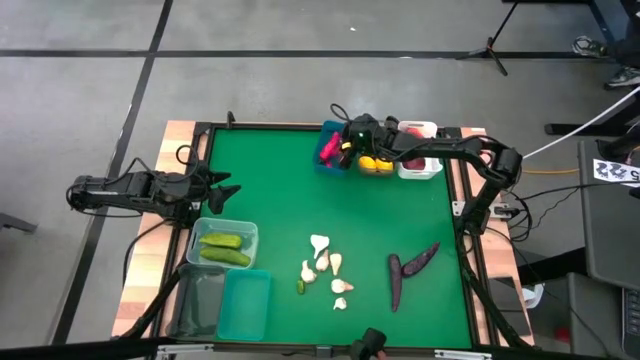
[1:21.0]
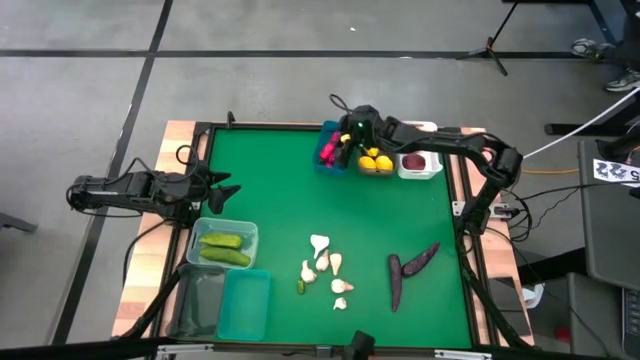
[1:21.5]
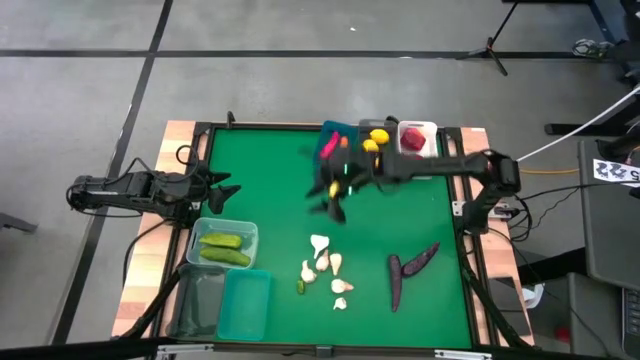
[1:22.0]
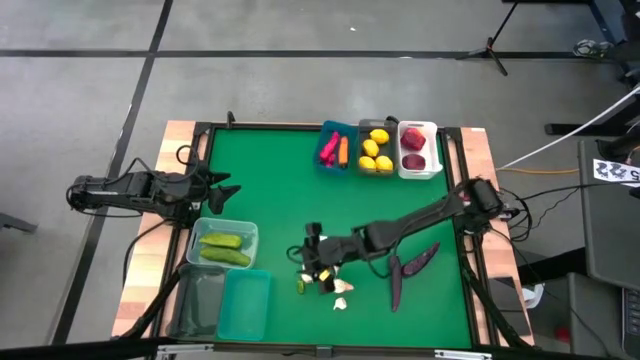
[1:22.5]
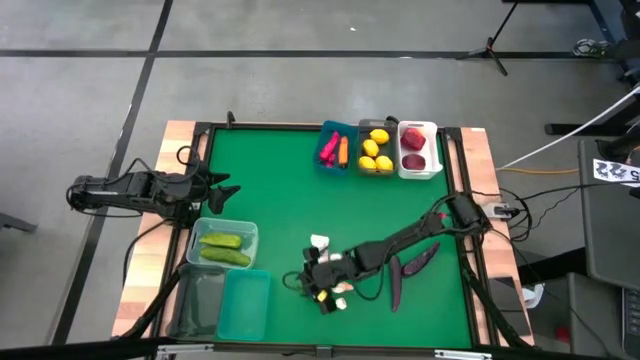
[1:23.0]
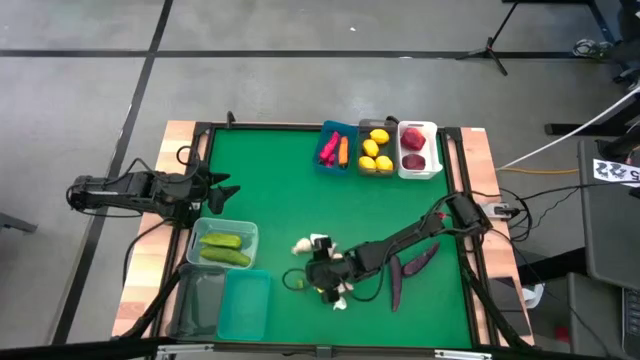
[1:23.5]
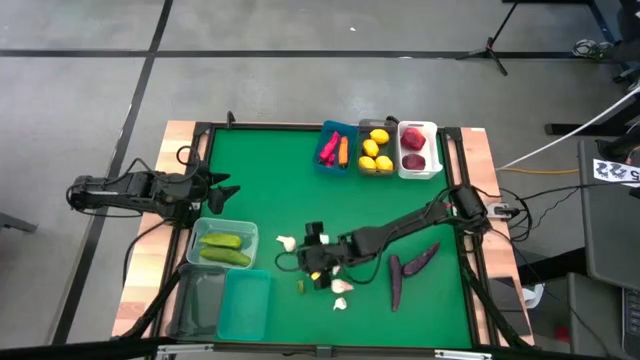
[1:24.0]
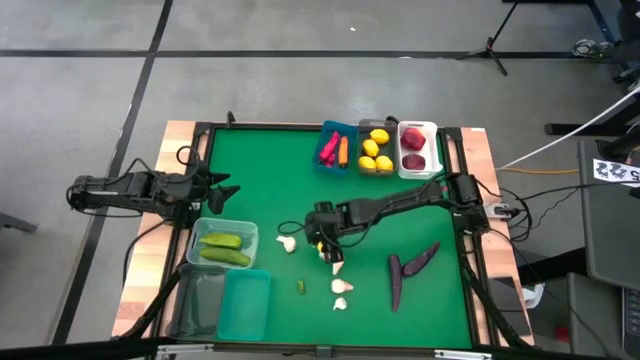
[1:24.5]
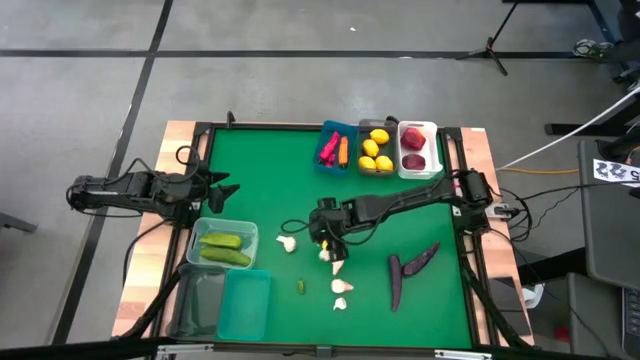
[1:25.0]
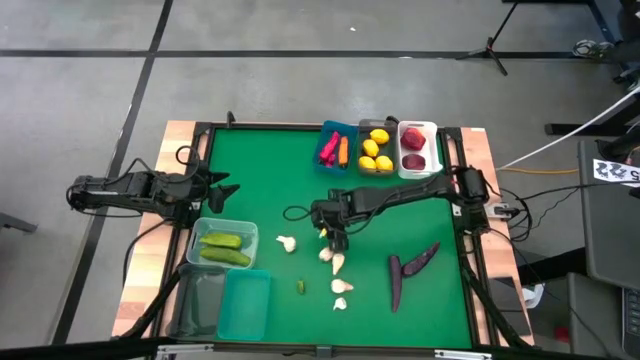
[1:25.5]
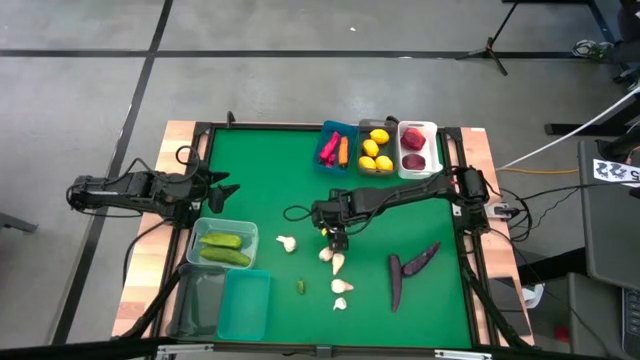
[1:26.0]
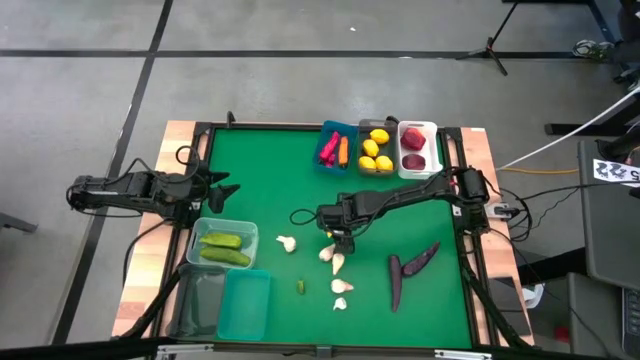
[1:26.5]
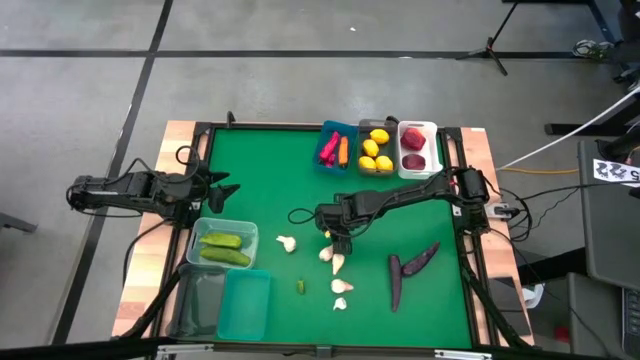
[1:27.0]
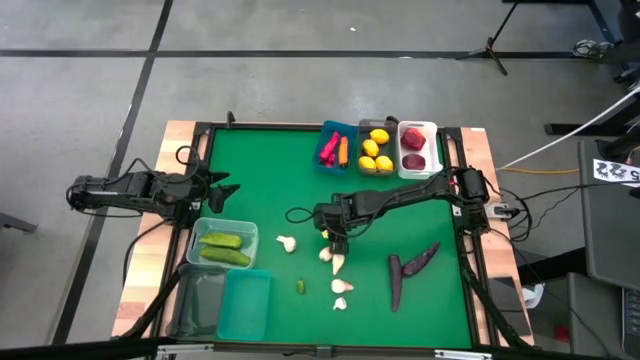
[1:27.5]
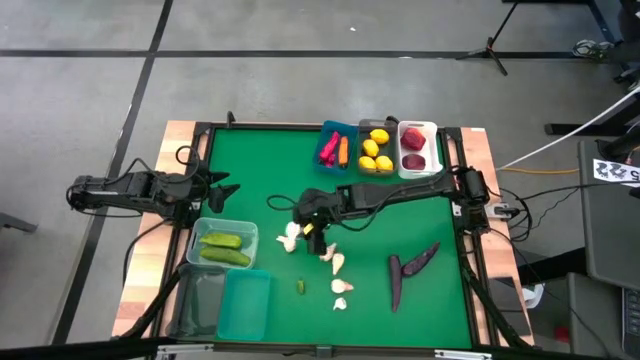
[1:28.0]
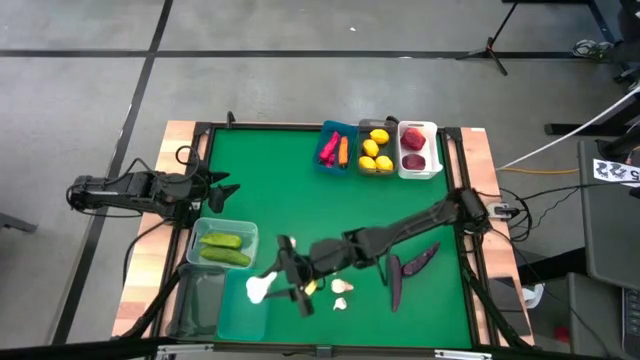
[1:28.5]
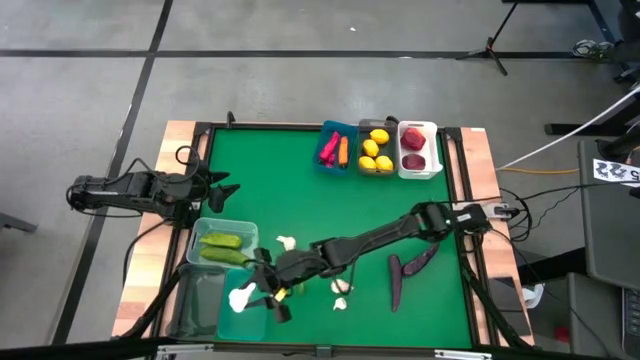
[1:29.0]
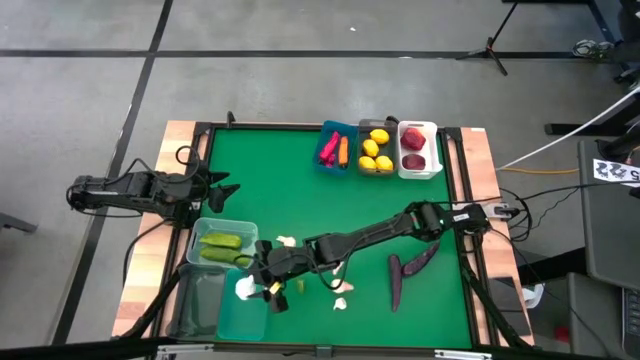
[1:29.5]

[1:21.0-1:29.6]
Task: Sort produce into baskets
Put the white garlic into the green bin

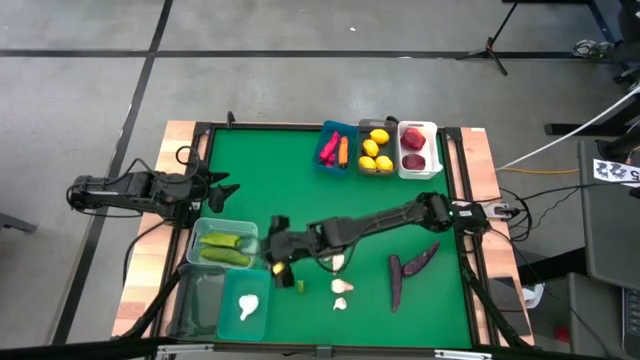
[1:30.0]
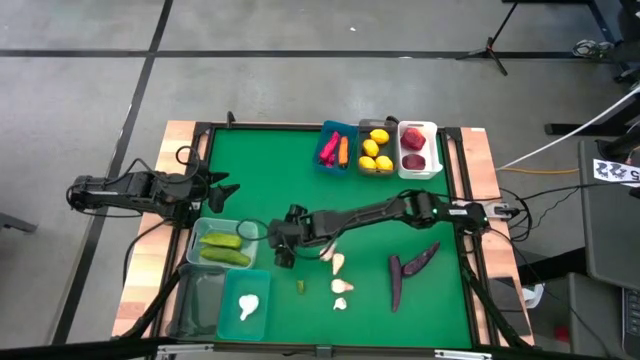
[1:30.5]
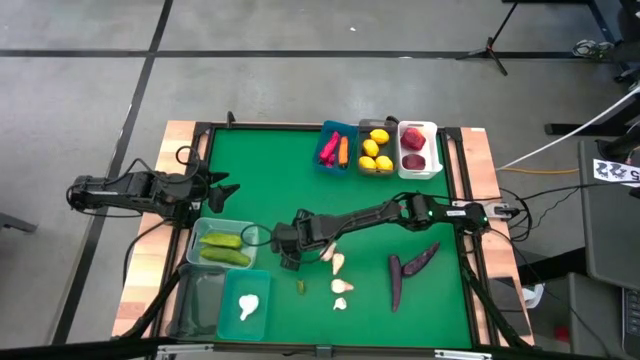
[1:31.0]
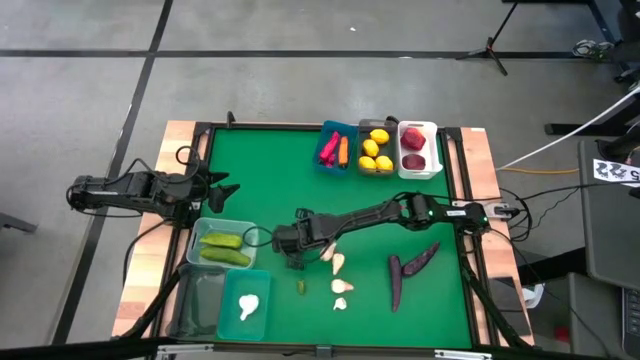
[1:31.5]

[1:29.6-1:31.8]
Put the white garlic into the green bin

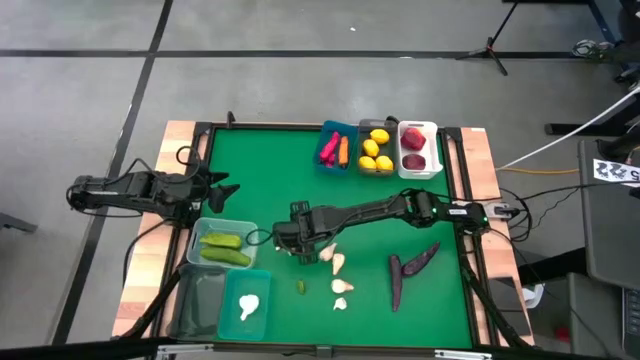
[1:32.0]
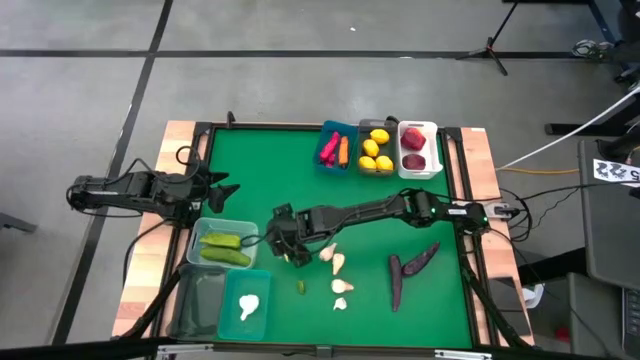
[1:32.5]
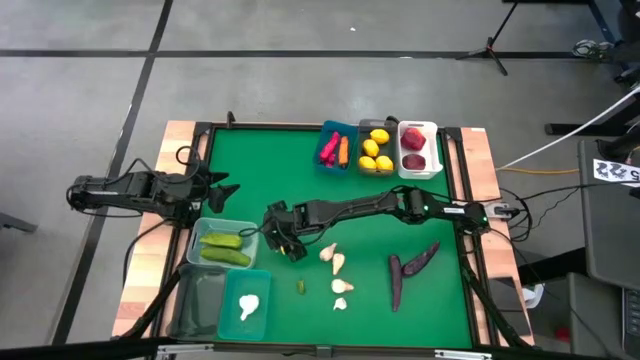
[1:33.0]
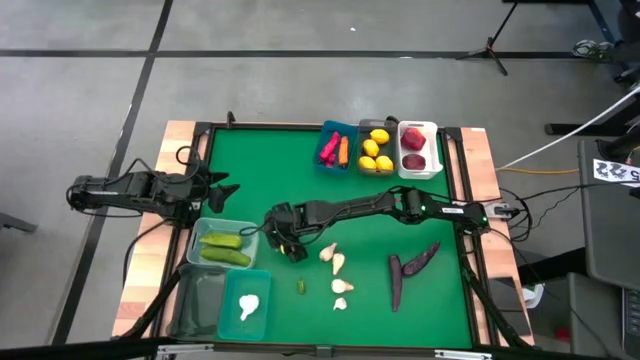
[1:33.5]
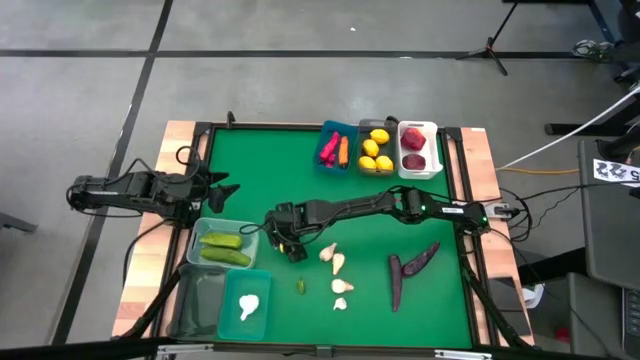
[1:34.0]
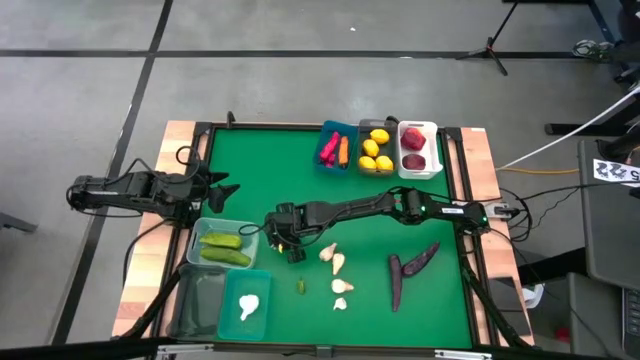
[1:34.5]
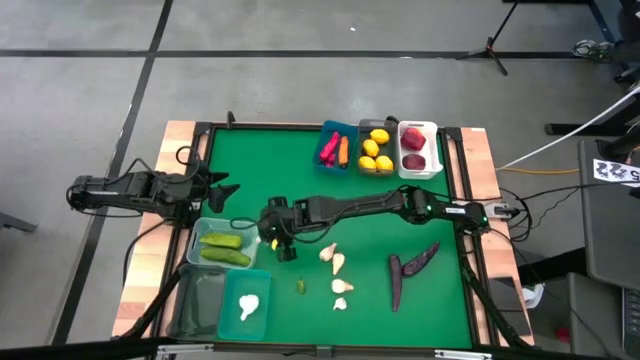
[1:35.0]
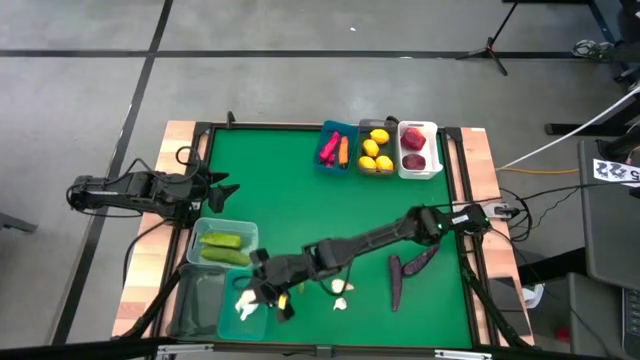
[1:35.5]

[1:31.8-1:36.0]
Put the white garlic into the green bin

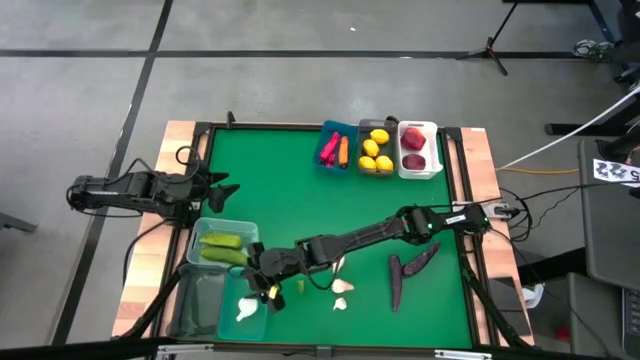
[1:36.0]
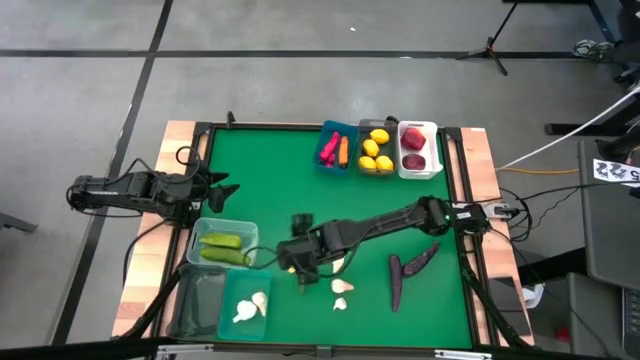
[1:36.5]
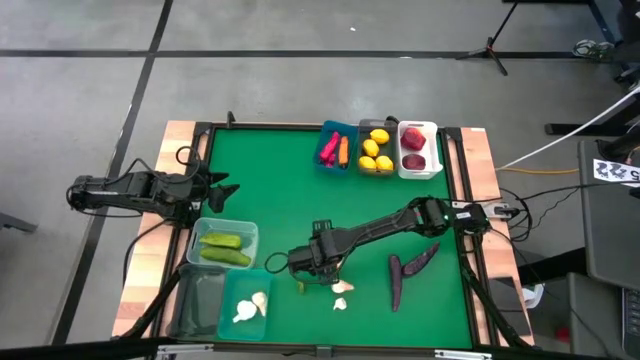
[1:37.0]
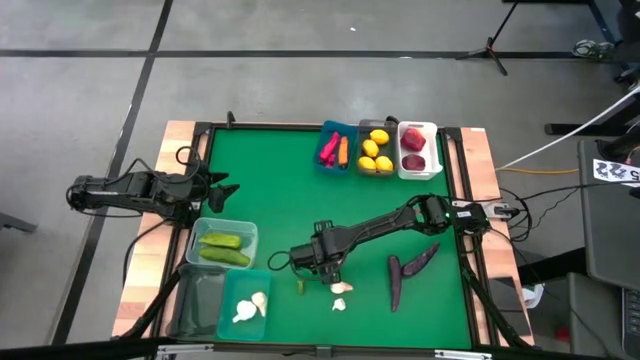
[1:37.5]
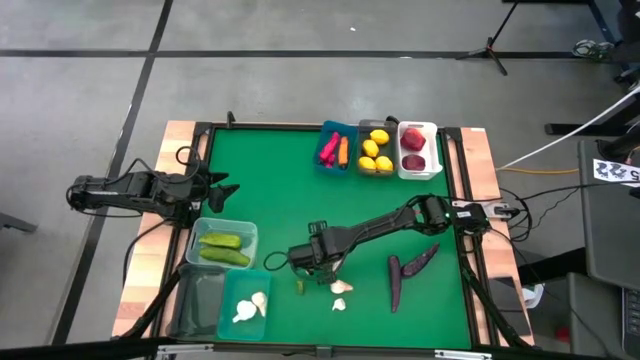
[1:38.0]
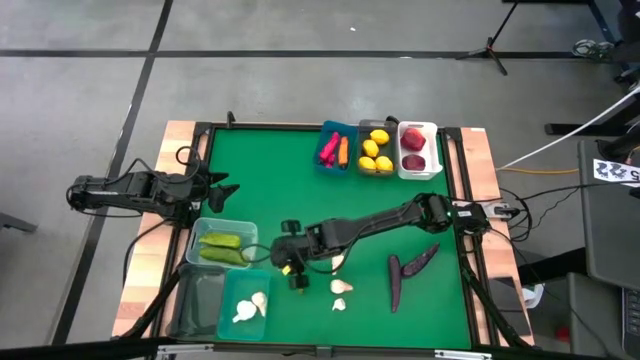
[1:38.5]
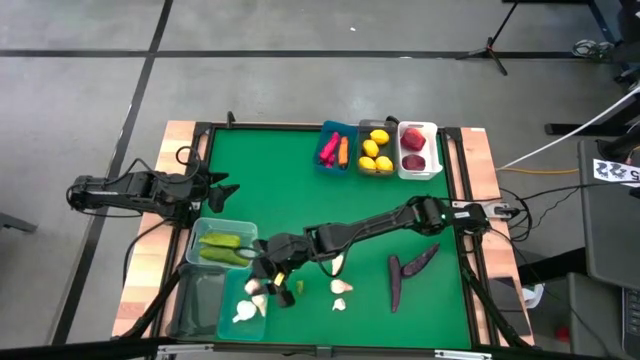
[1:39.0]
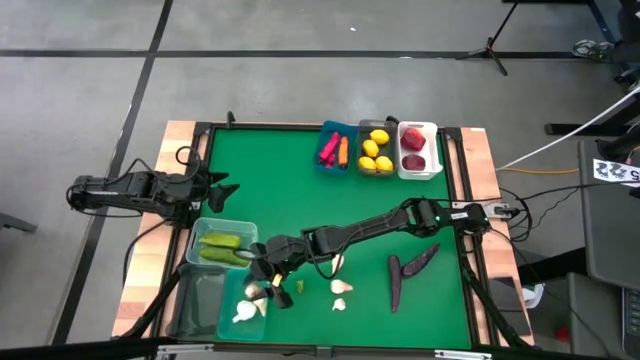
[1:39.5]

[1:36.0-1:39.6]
Put the white garlic into the green bin

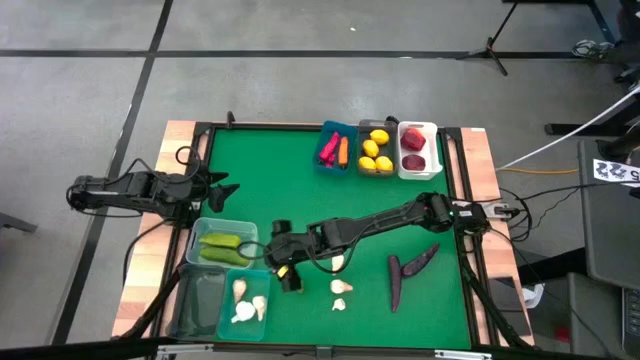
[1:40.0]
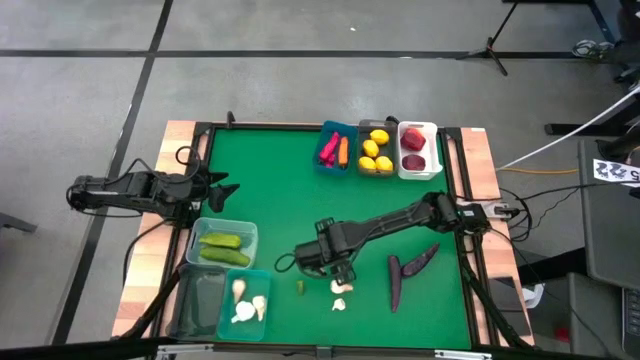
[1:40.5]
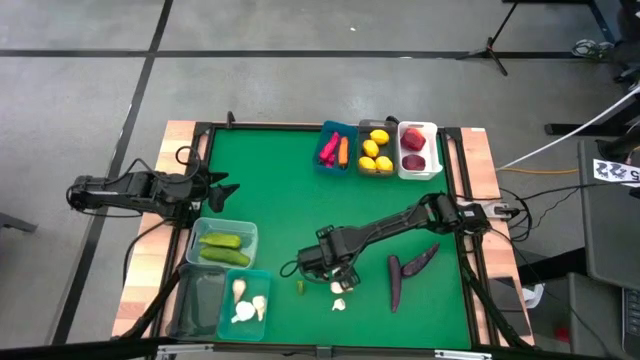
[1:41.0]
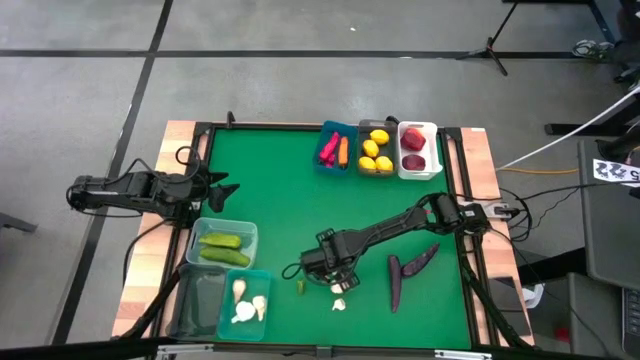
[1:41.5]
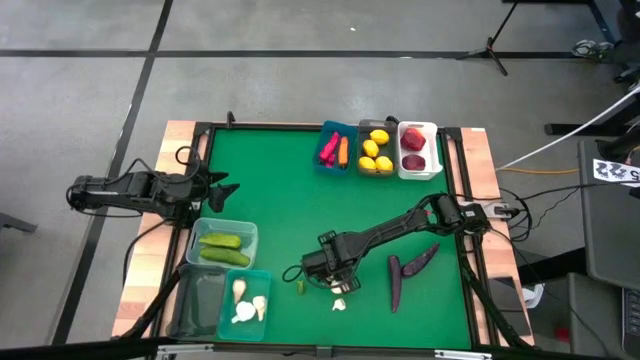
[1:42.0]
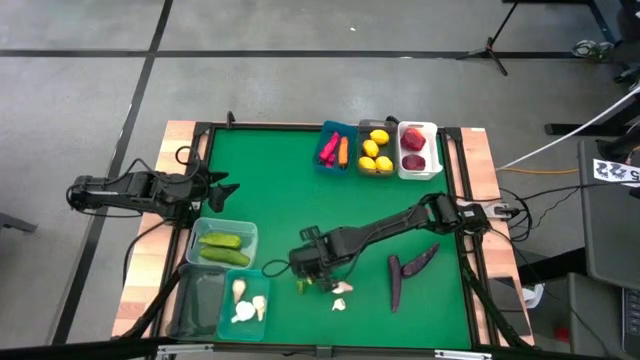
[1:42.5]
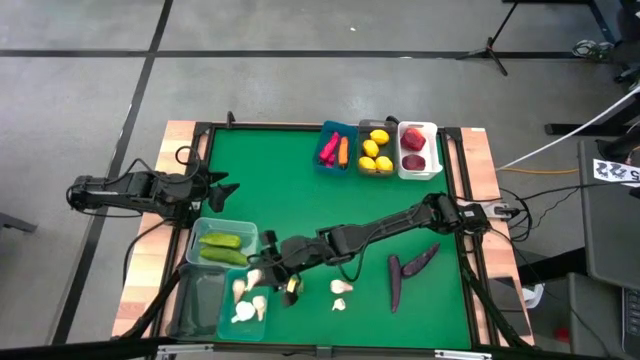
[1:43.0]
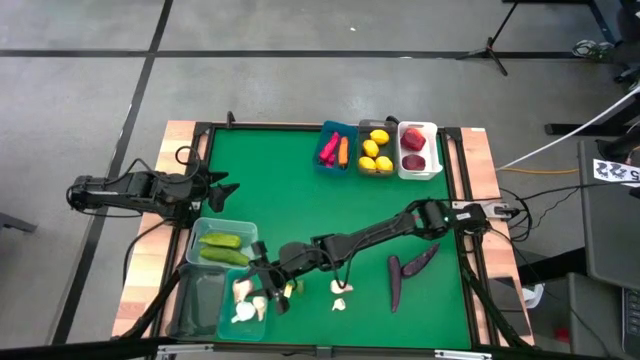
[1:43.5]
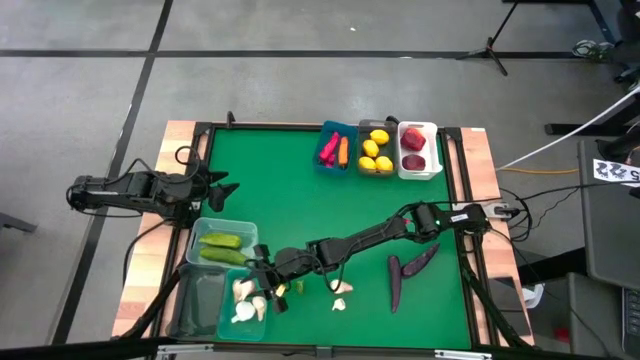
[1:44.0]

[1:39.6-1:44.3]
Put the white garlic into the green bin
